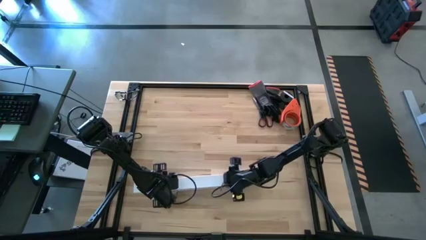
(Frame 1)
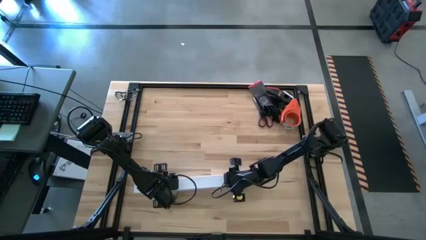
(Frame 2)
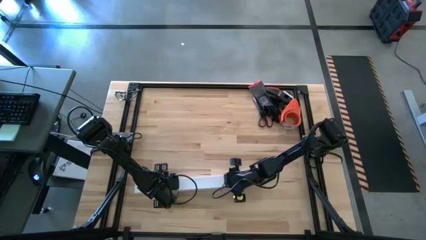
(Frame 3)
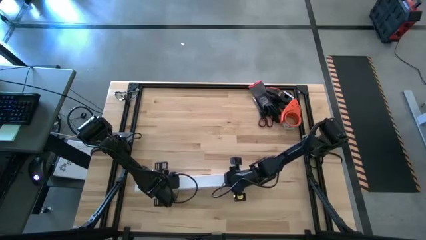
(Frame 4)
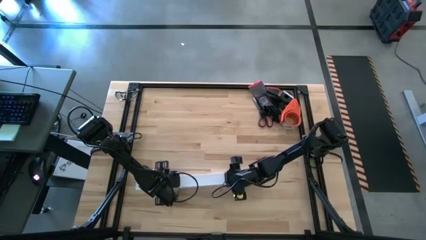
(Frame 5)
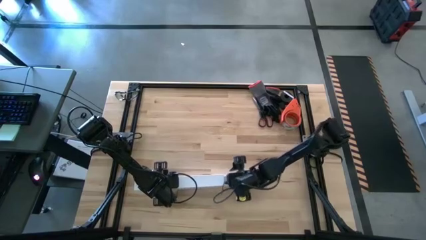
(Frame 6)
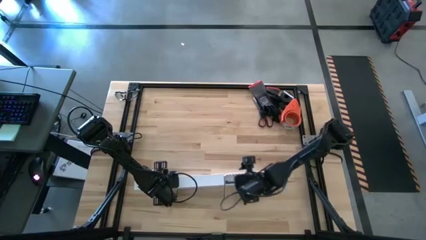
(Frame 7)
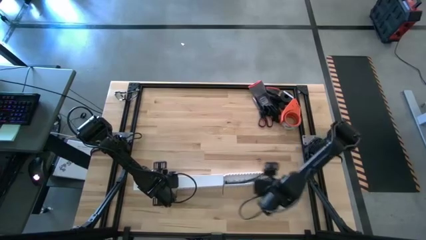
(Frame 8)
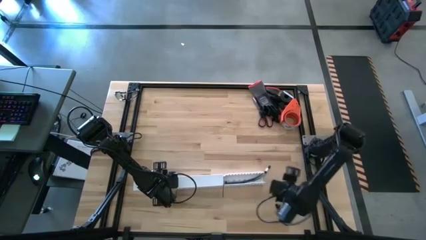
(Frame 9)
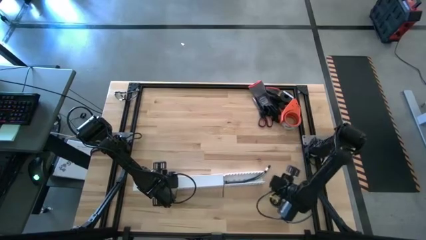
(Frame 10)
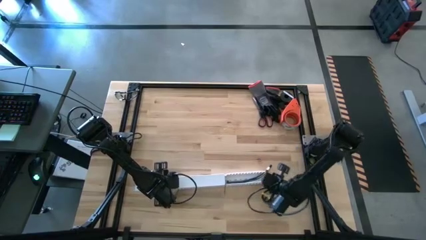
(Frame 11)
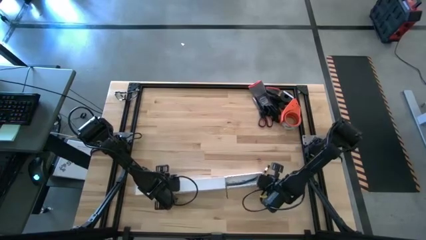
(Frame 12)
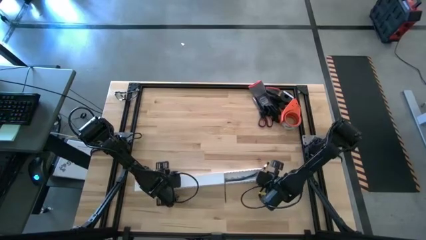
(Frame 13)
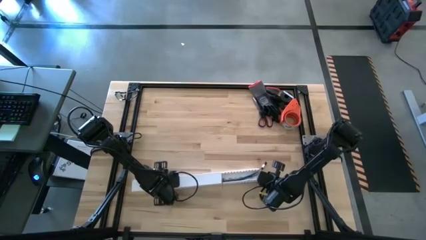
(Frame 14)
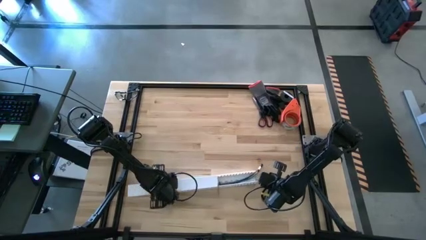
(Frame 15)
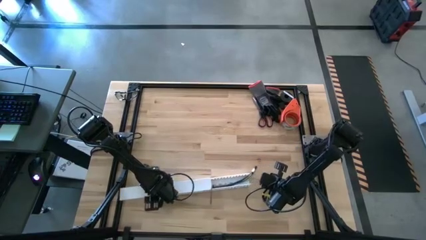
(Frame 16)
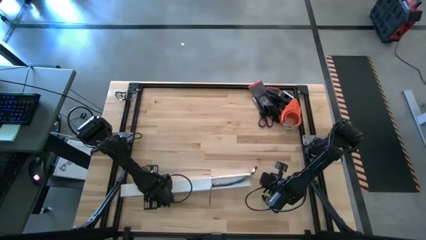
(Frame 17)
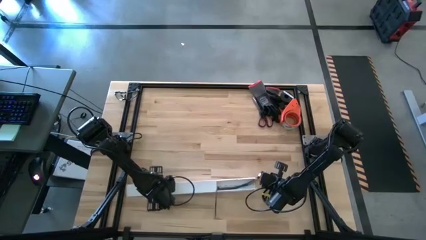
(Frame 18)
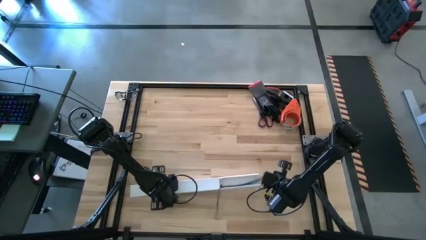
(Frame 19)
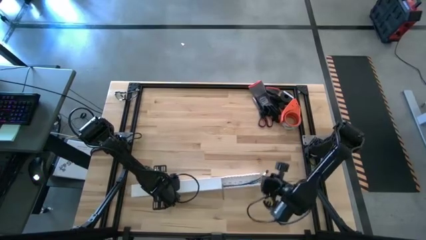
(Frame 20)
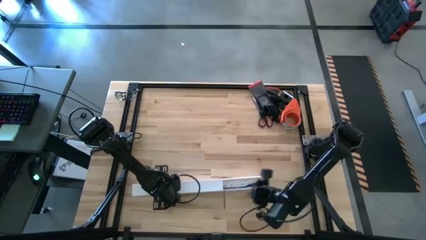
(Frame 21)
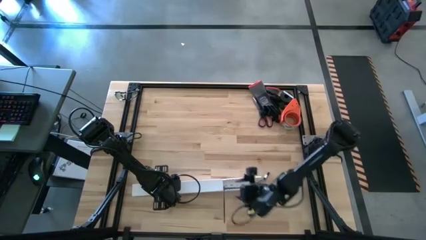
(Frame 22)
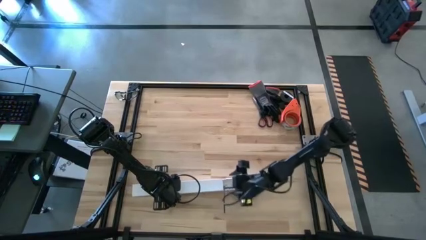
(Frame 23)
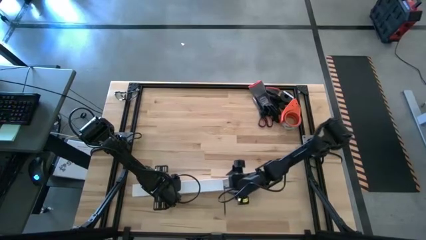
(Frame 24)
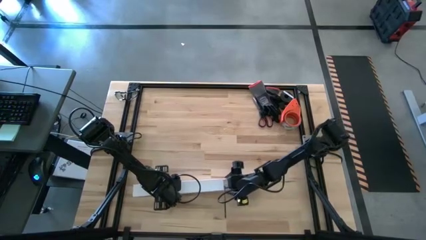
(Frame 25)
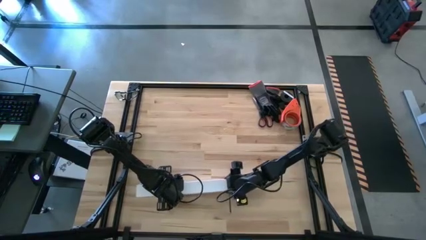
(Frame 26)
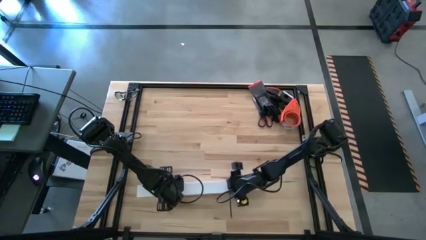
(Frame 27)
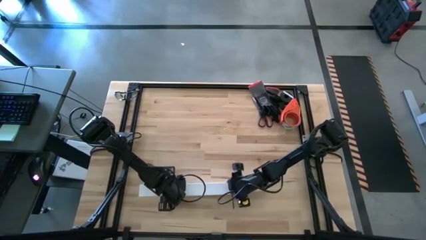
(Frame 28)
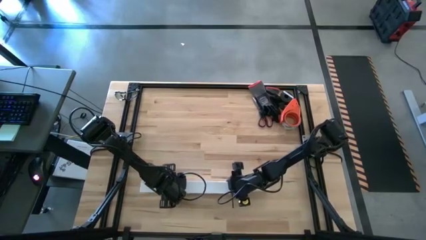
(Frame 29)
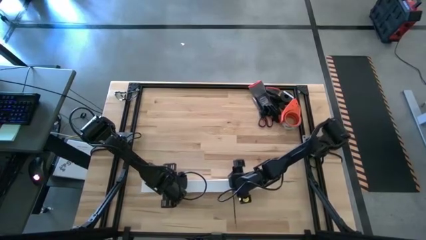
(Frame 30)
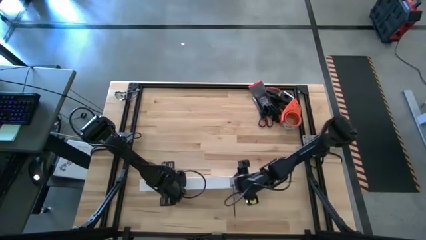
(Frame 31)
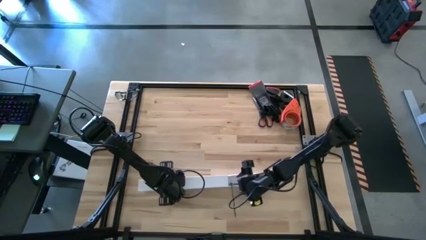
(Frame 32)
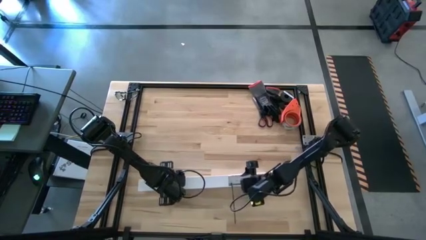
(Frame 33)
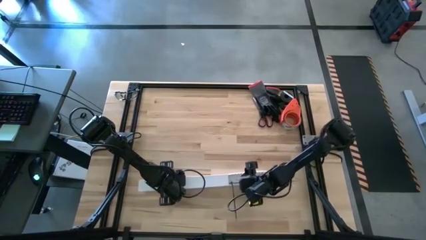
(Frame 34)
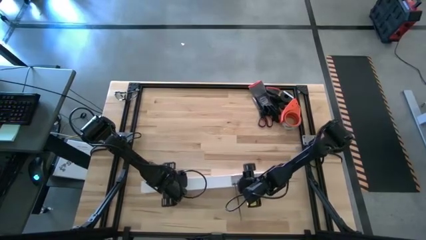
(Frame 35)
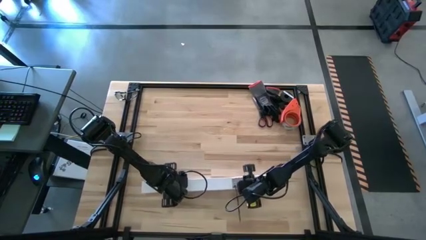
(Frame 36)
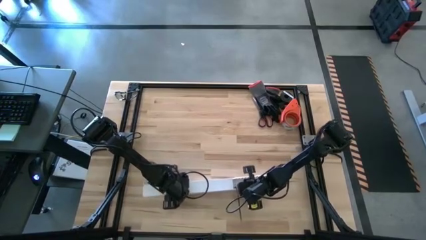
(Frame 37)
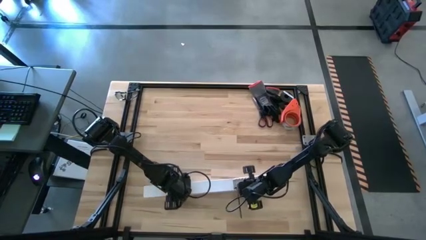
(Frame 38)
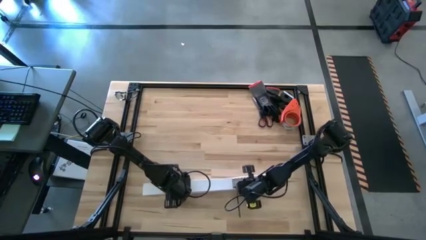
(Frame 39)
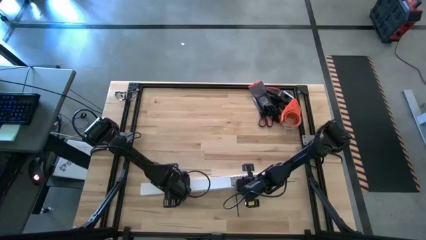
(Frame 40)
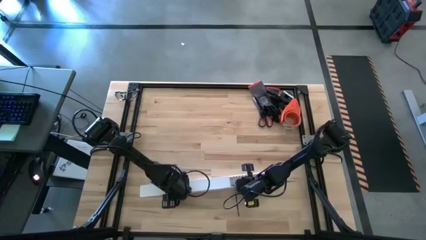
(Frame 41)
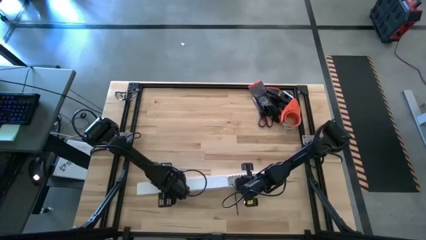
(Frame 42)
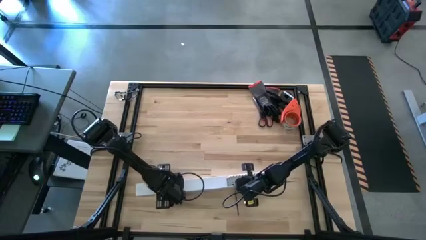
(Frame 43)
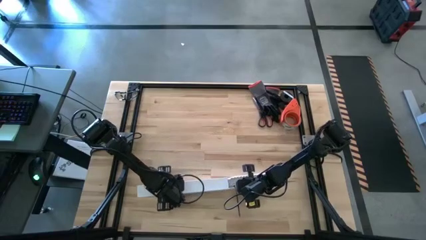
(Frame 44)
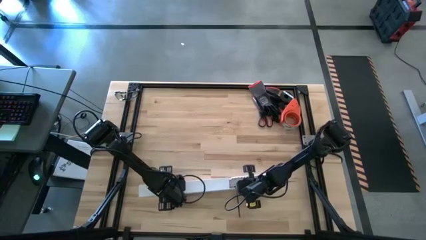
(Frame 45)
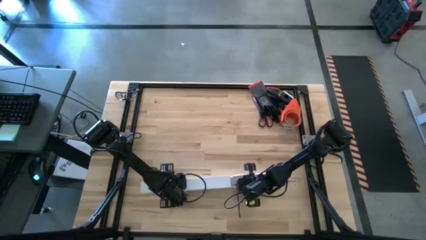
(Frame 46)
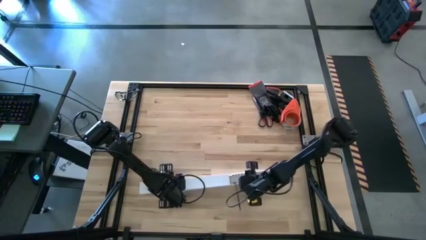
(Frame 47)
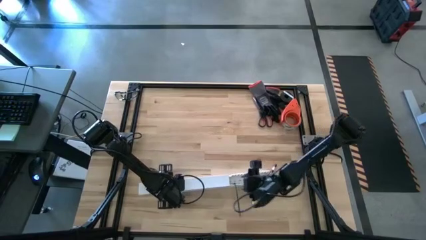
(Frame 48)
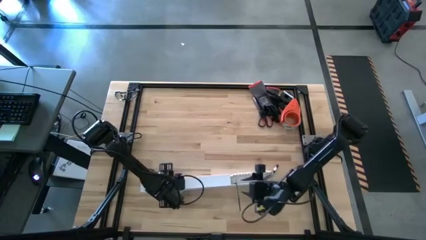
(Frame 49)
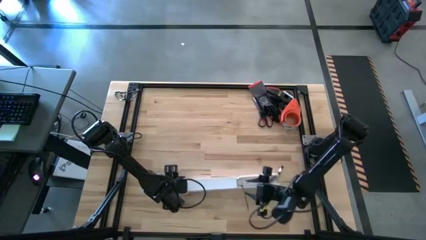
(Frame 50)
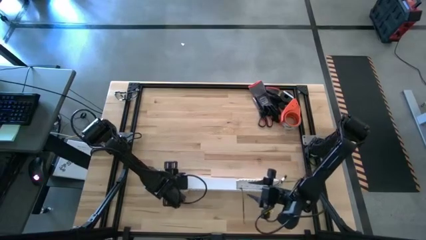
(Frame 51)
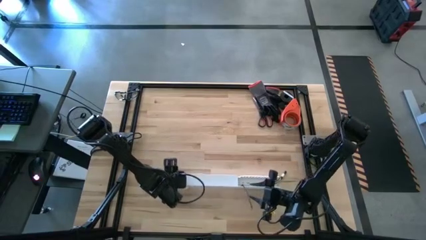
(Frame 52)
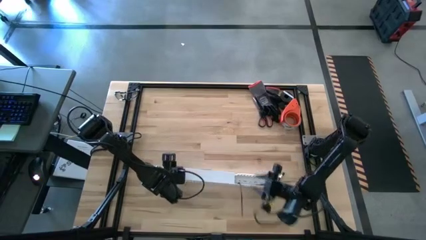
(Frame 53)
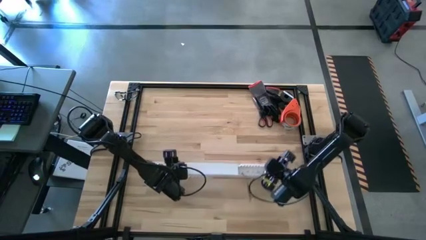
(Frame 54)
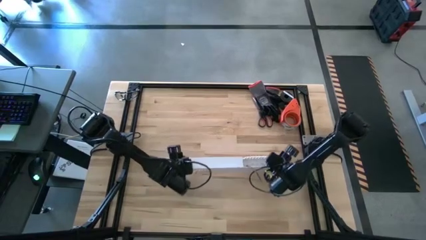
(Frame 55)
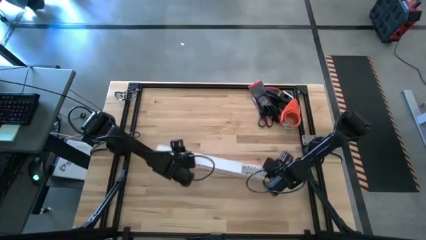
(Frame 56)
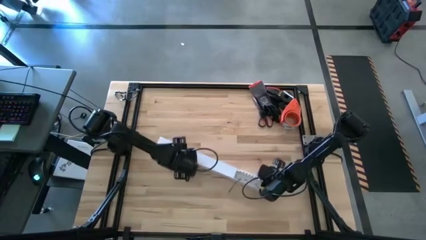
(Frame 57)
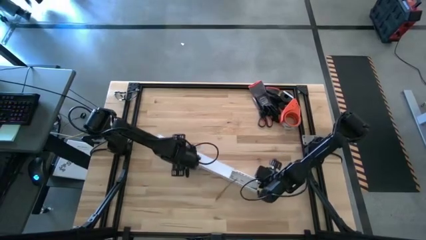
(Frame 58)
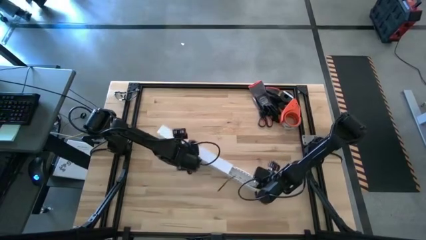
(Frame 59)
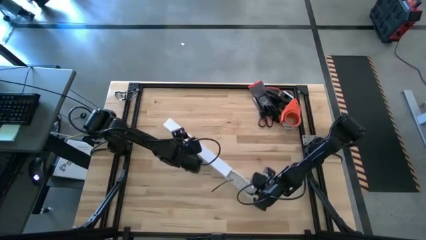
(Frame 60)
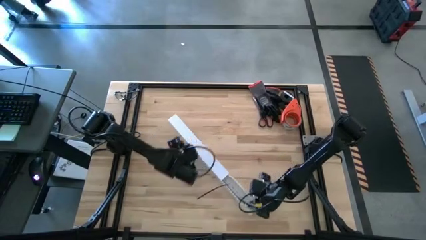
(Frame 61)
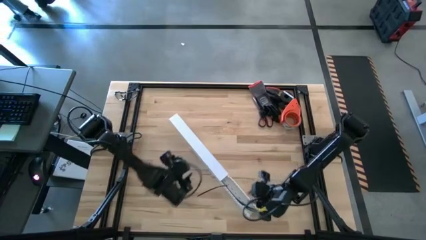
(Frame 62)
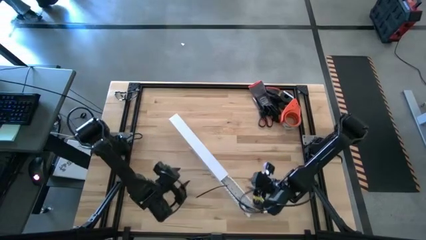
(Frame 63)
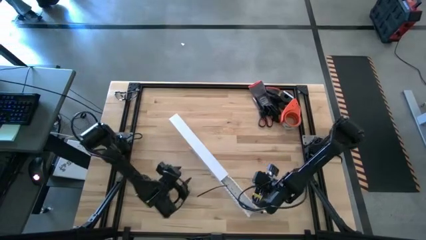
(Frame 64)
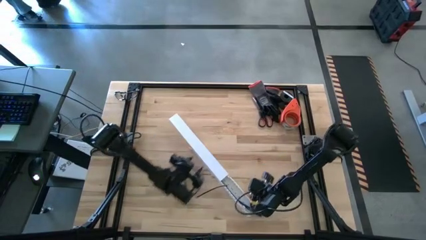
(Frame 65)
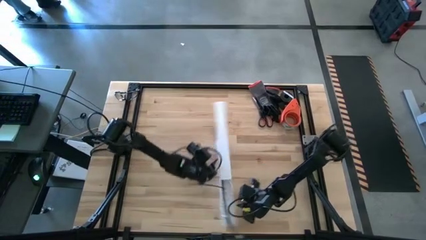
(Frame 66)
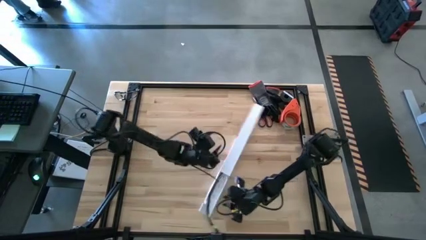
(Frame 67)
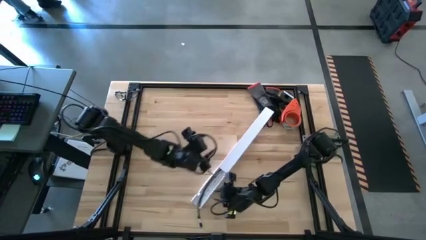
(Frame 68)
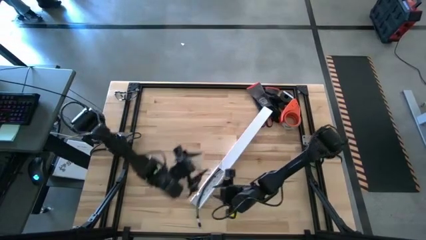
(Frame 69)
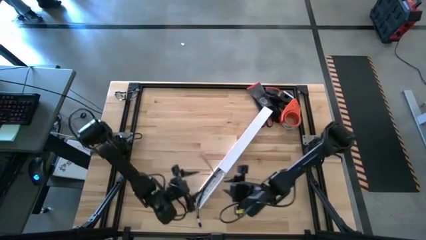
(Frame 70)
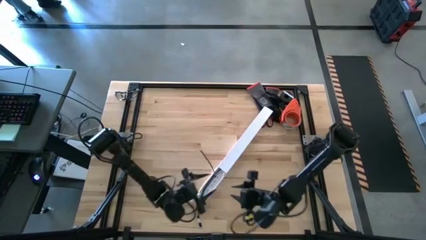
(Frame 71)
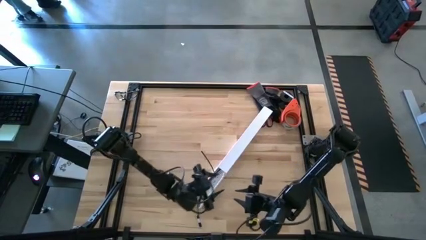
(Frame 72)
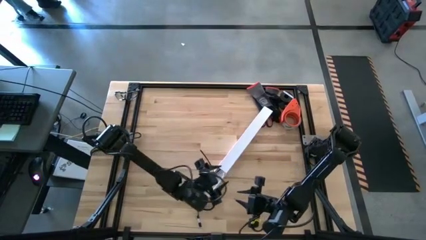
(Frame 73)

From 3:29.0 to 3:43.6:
Task: Ziptie cables
Close the white cable duct
